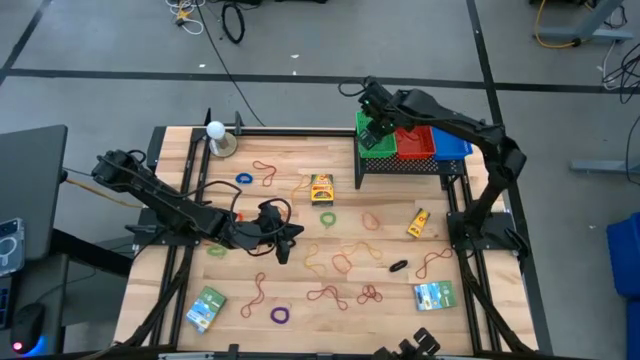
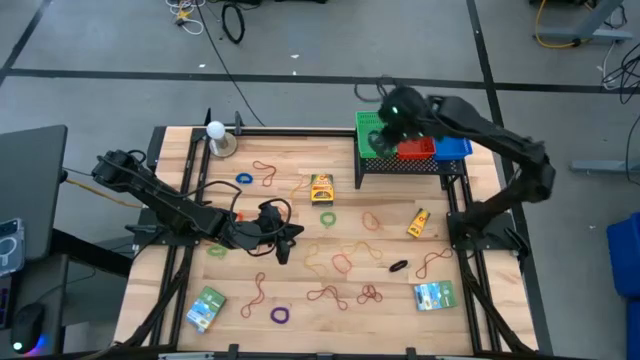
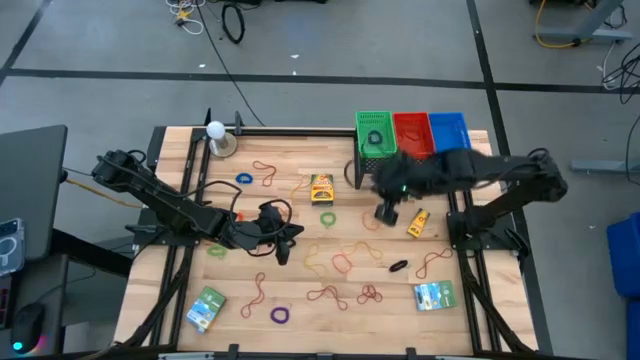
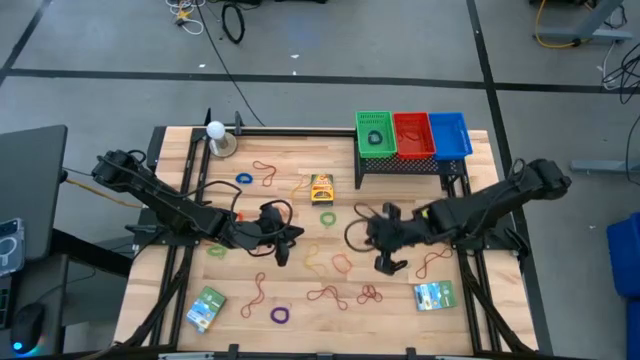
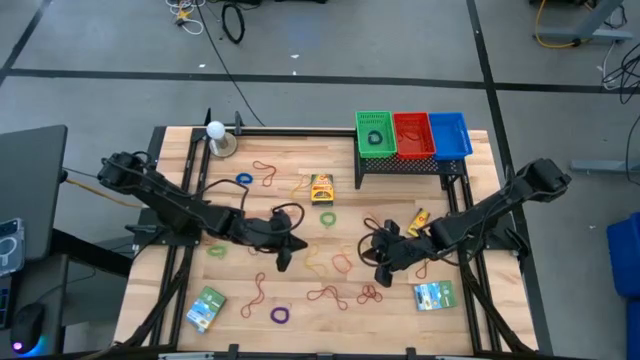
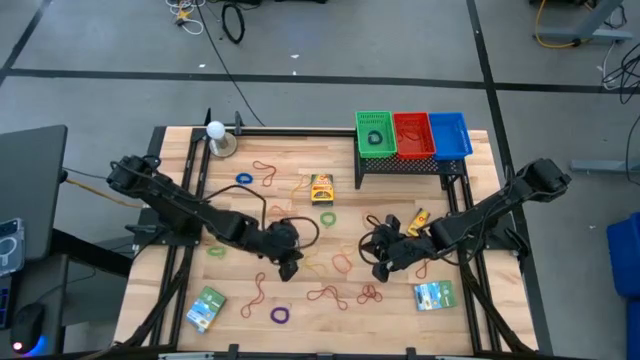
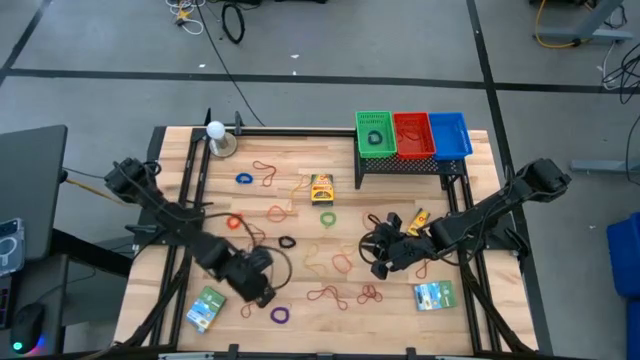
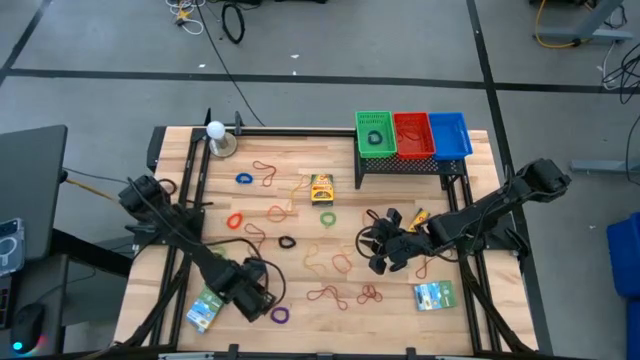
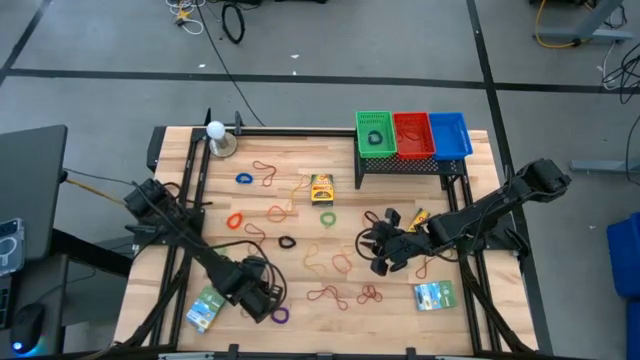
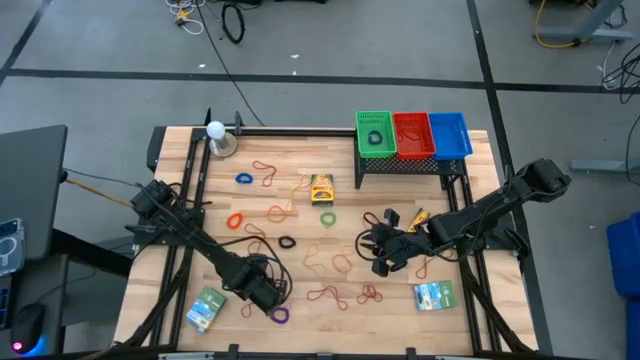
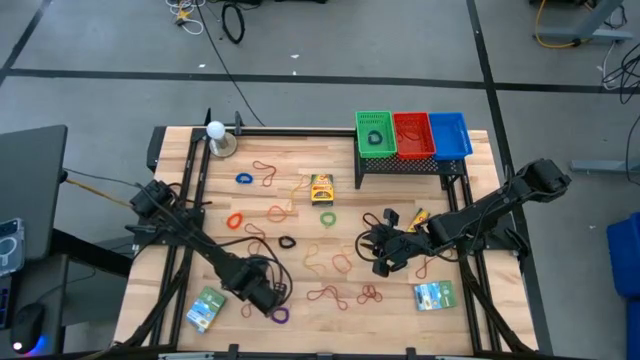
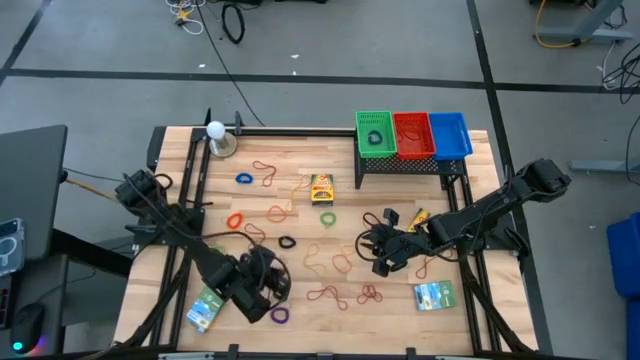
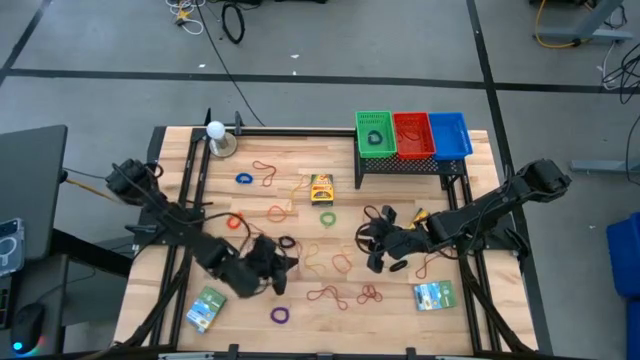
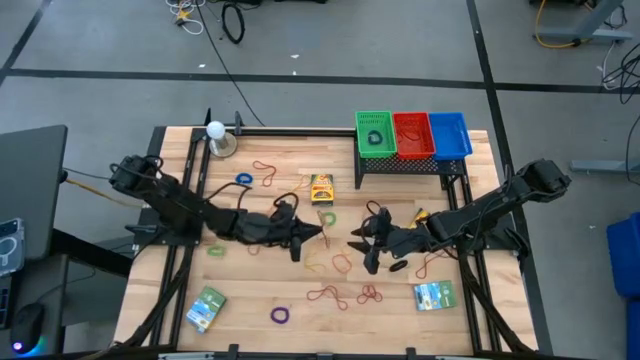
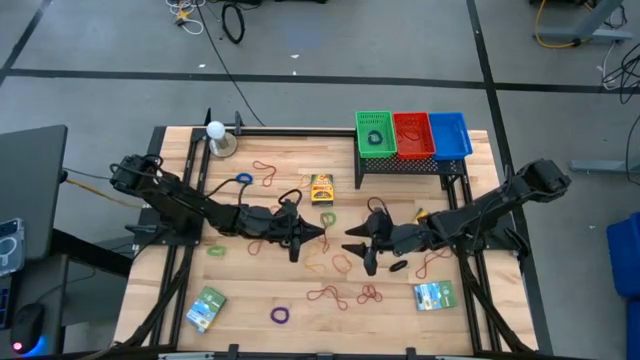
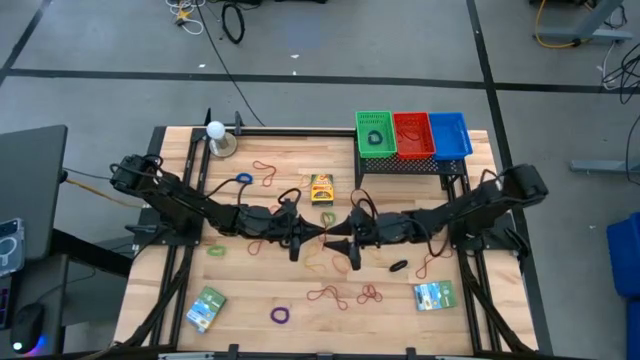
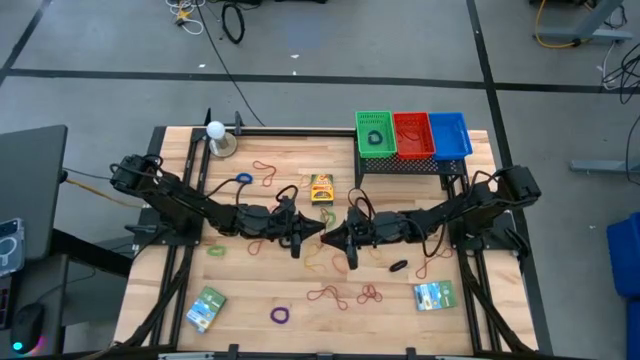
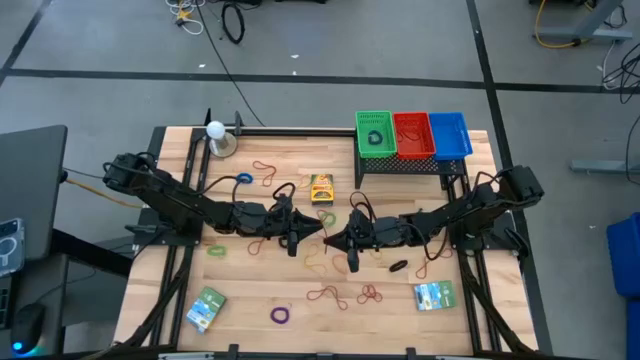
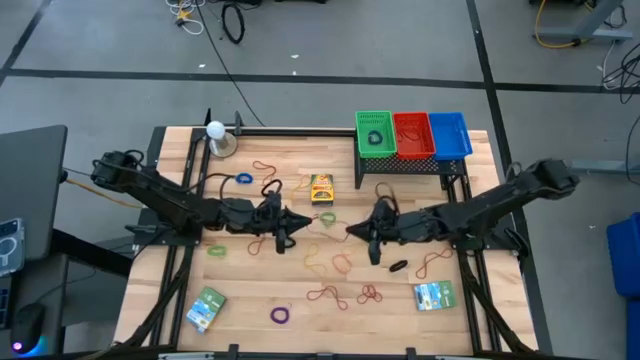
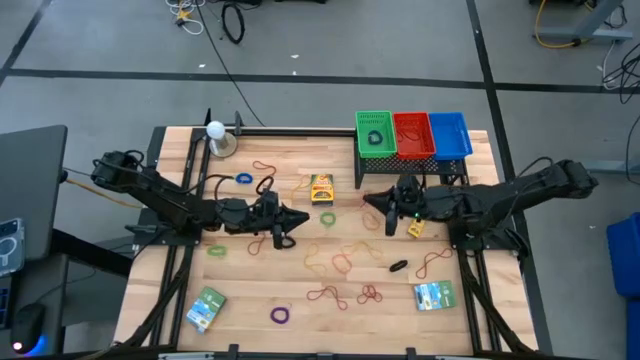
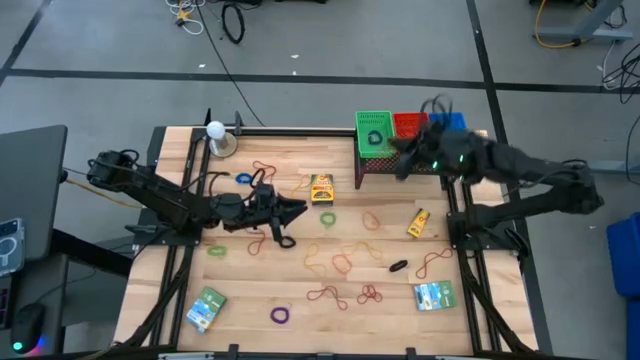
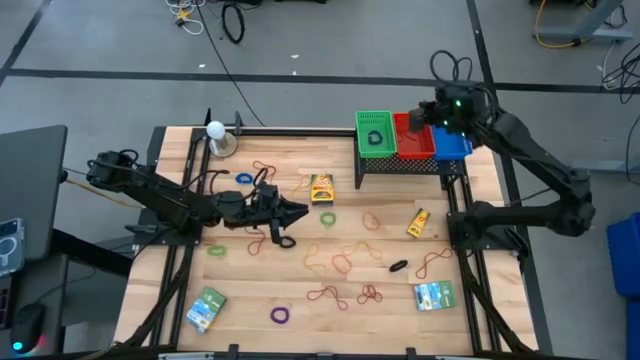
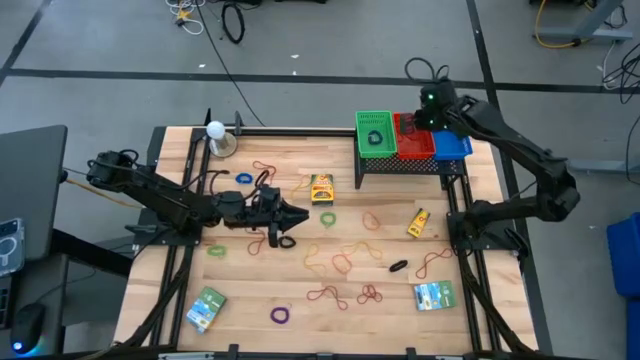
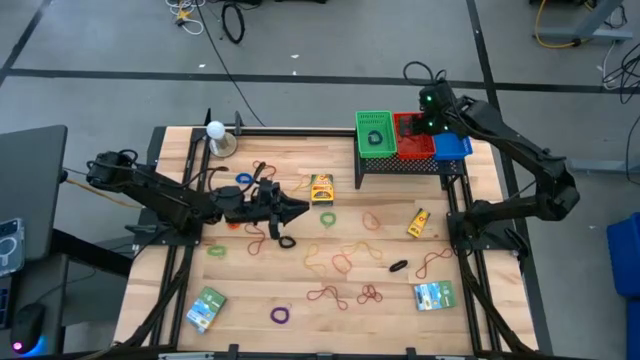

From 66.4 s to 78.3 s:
Task: Pick & Place Office Desk Supplies
Put the red rubber band into the red bin

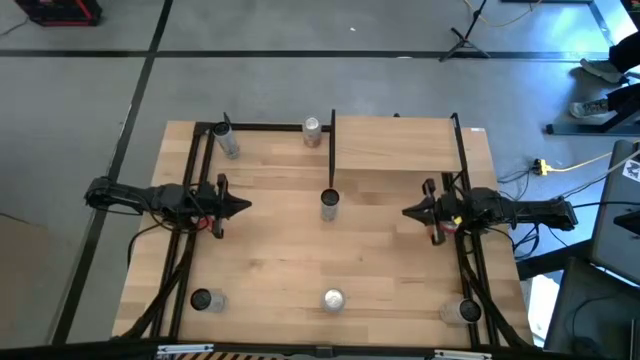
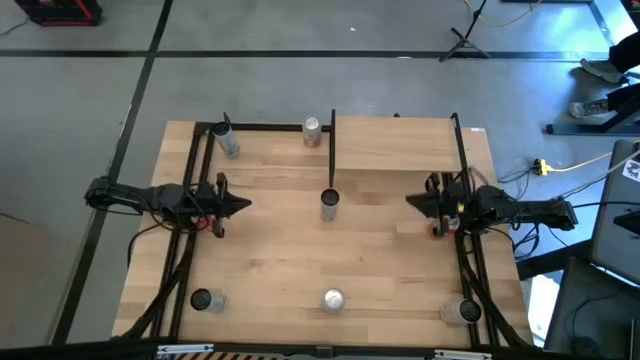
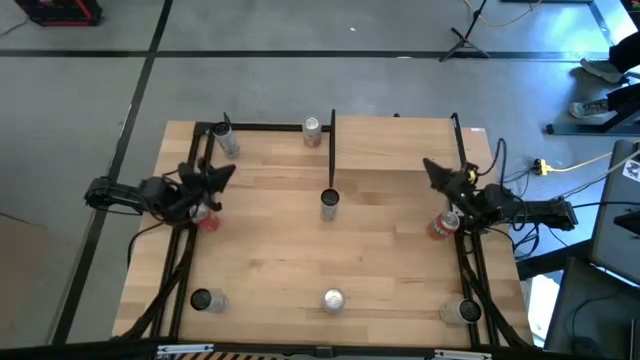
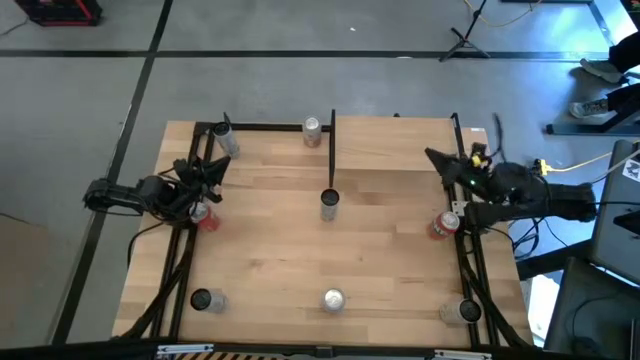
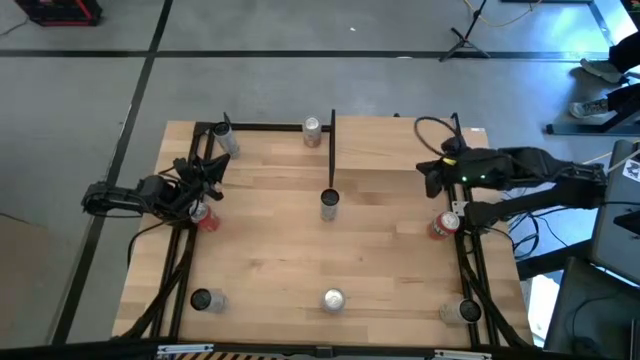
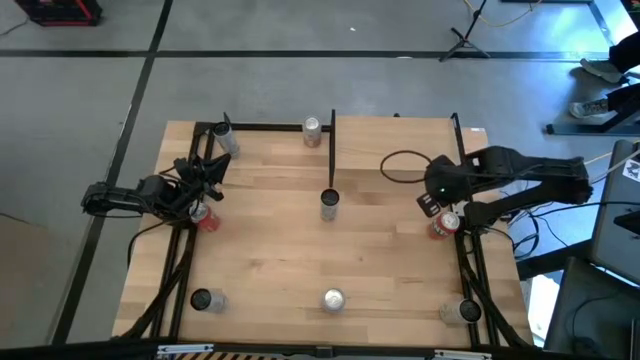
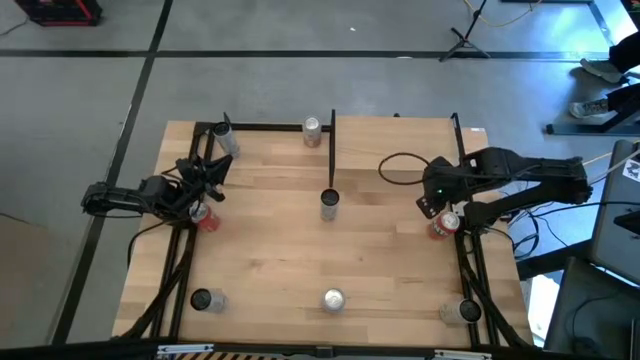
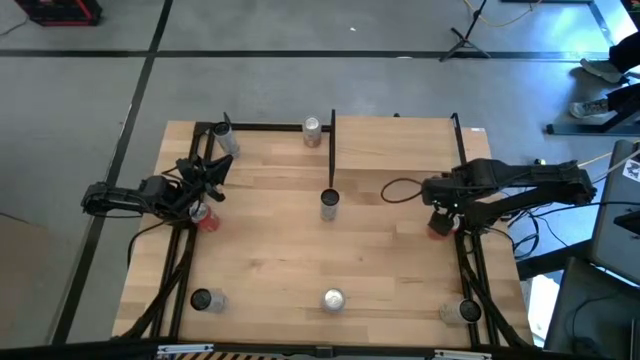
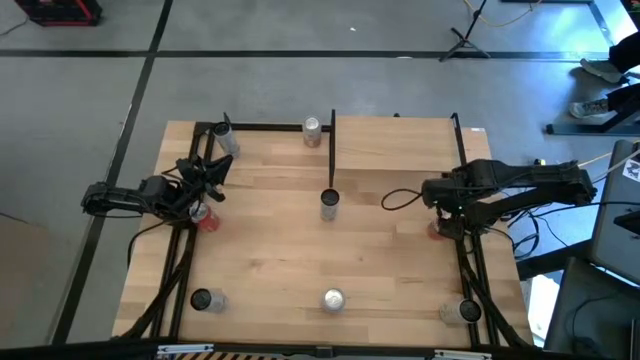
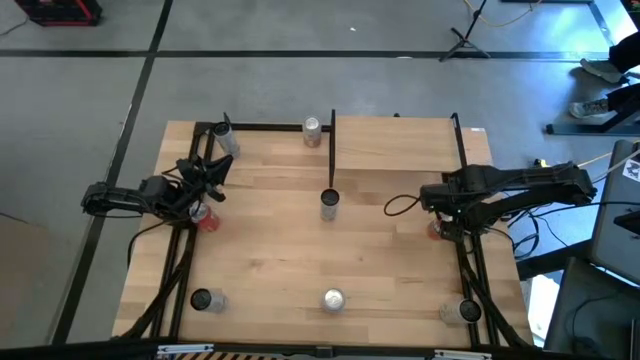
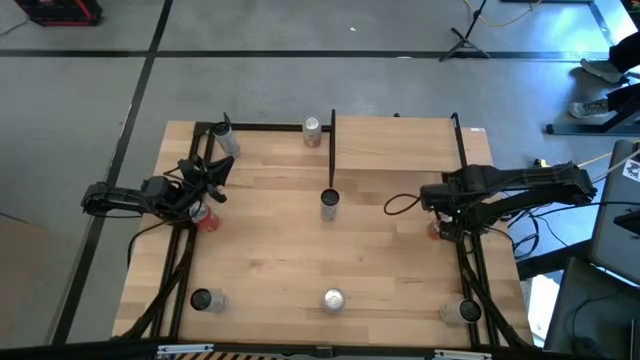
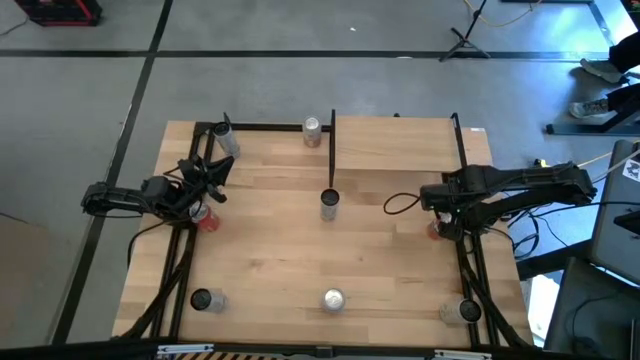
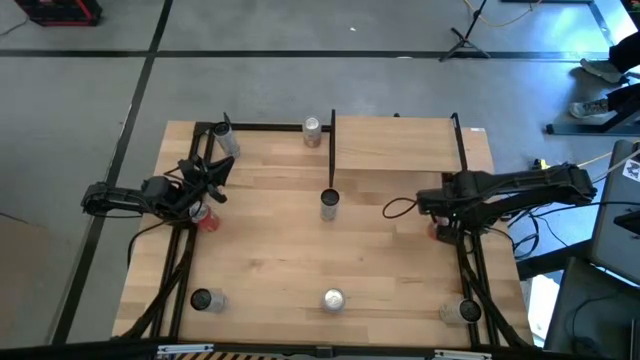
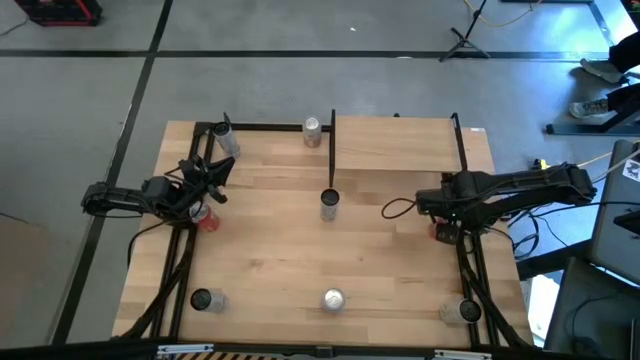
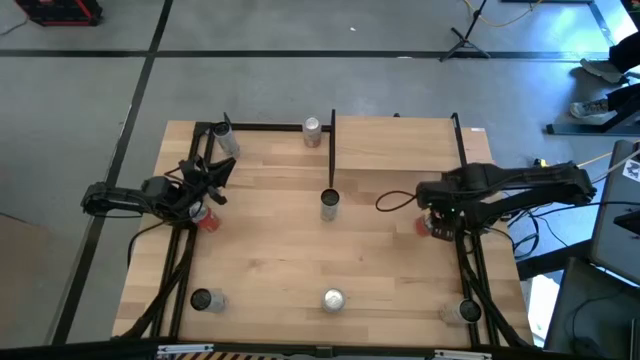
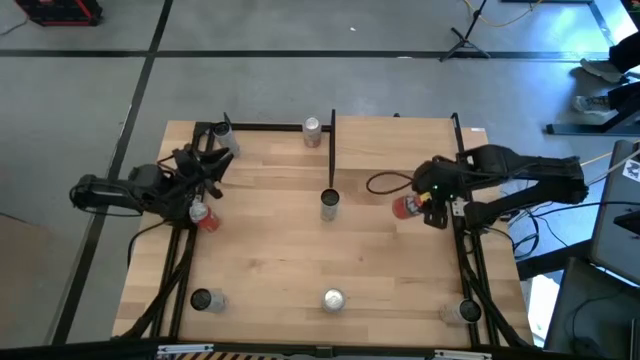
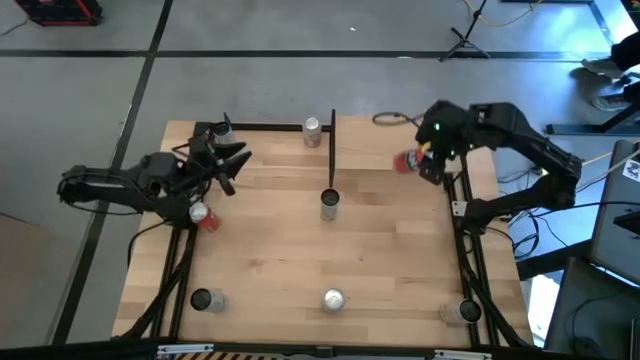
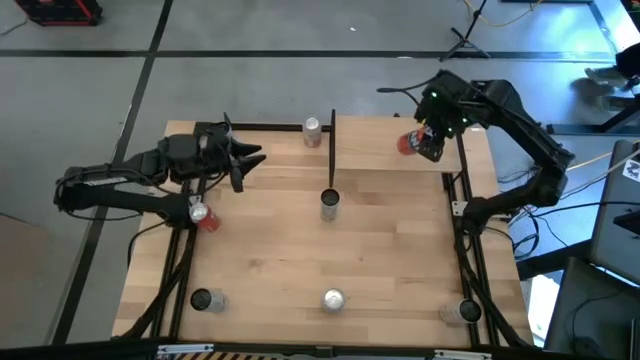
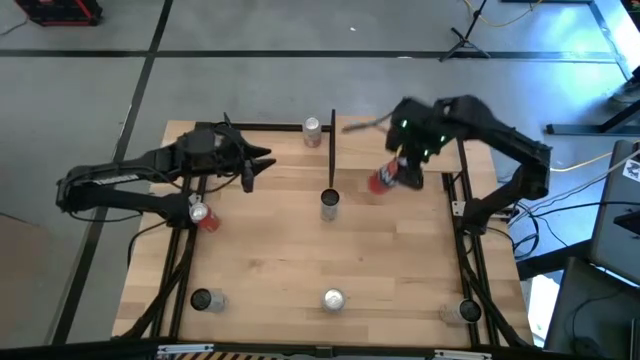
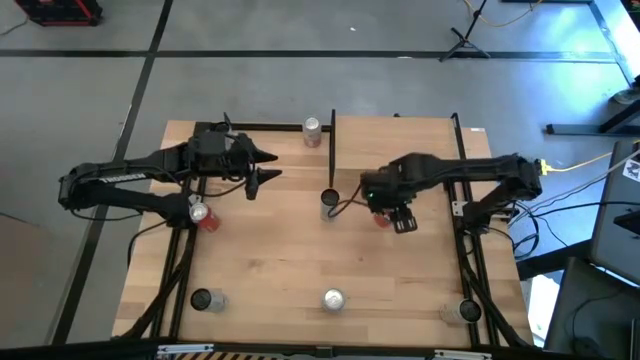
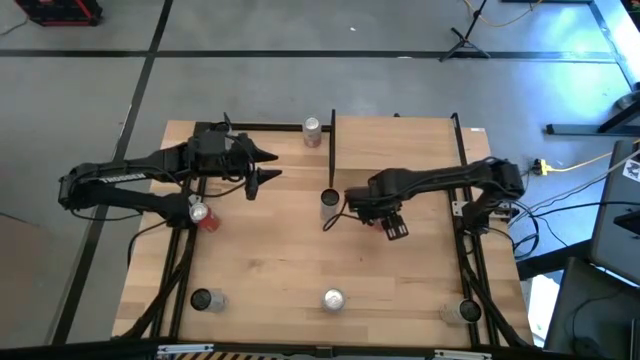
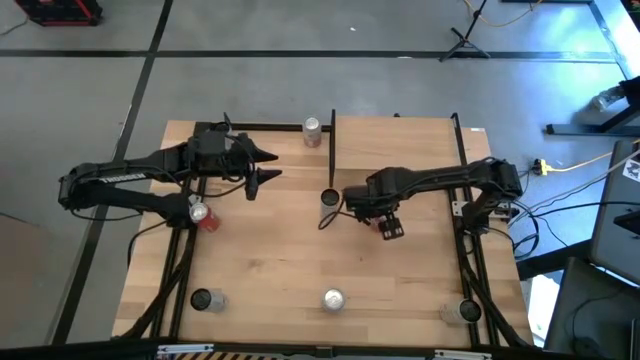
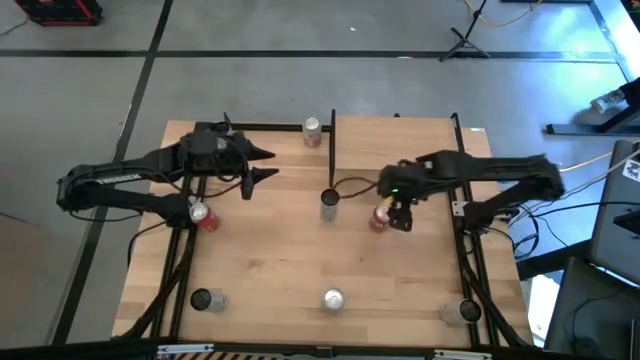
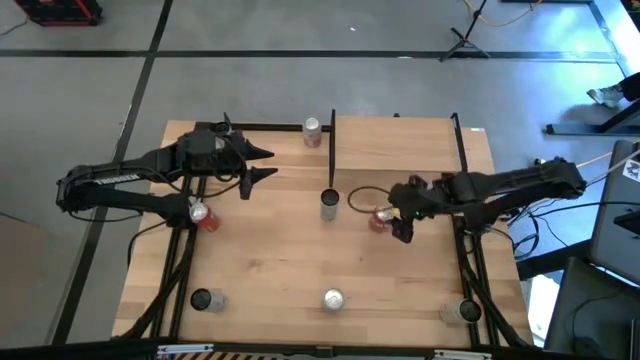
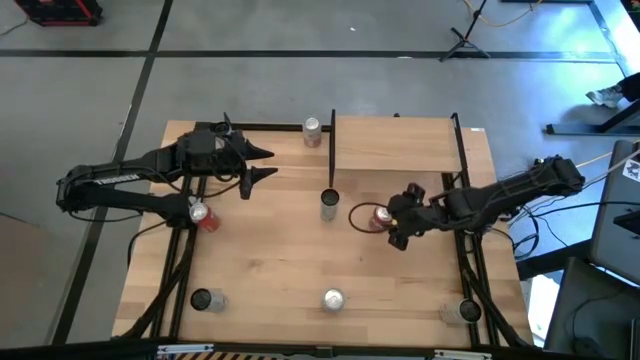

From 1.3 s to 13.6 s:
Task: Place canned beverage on shelf
Put the left red soda can on the shelf
